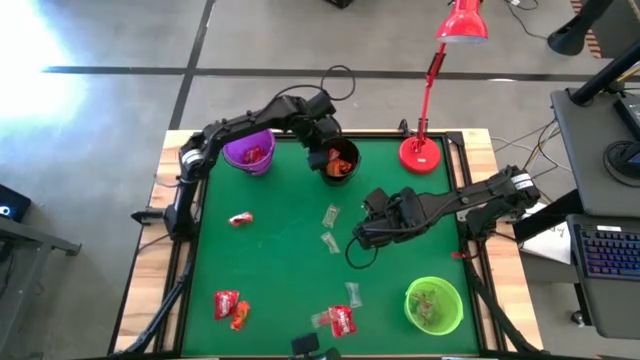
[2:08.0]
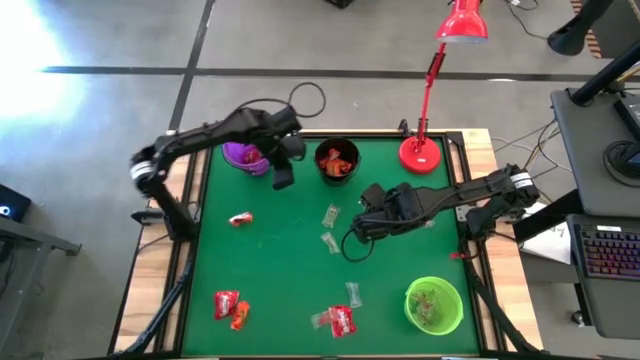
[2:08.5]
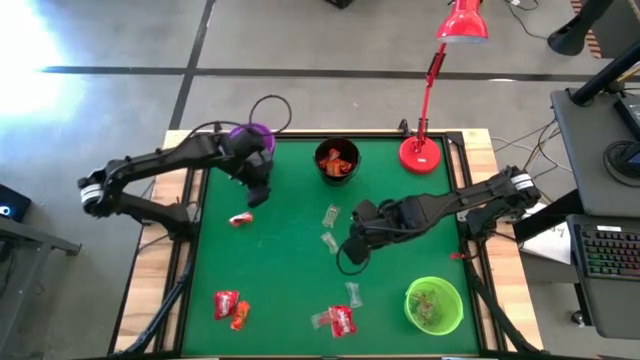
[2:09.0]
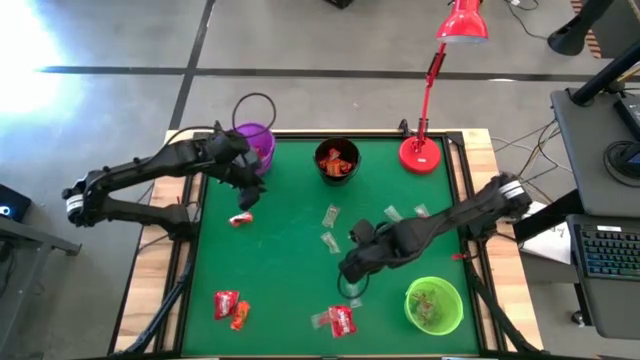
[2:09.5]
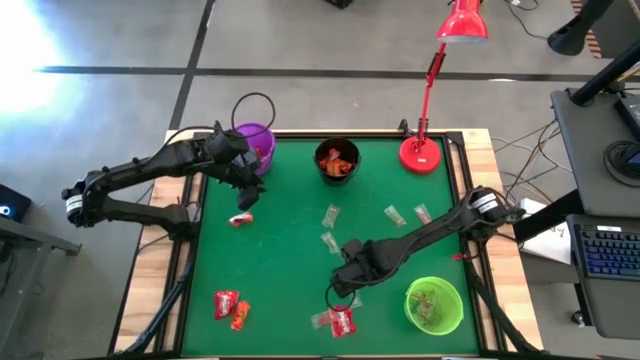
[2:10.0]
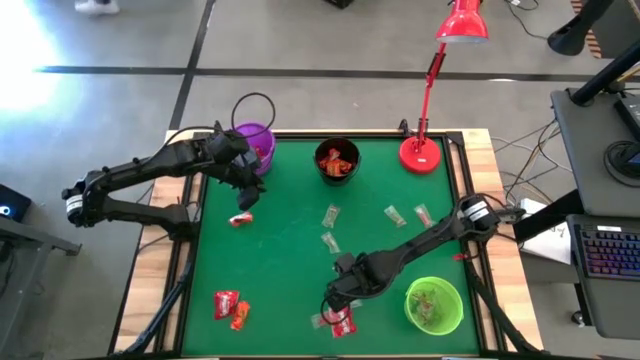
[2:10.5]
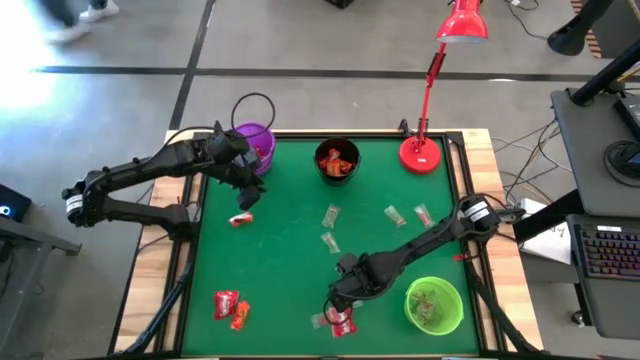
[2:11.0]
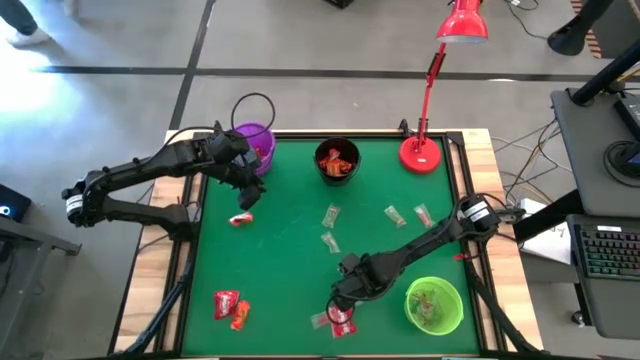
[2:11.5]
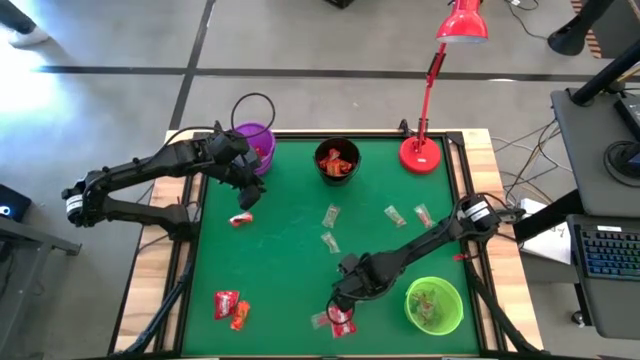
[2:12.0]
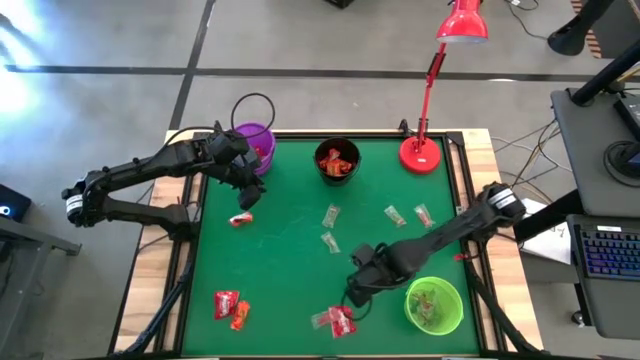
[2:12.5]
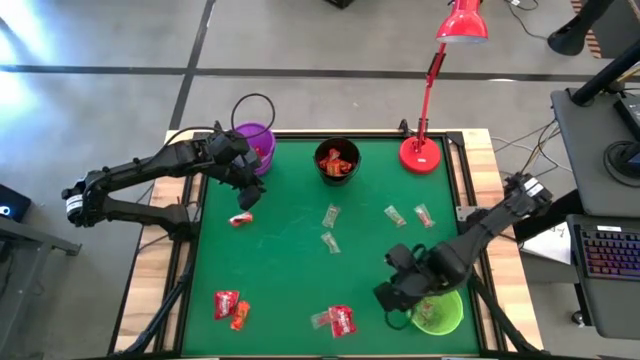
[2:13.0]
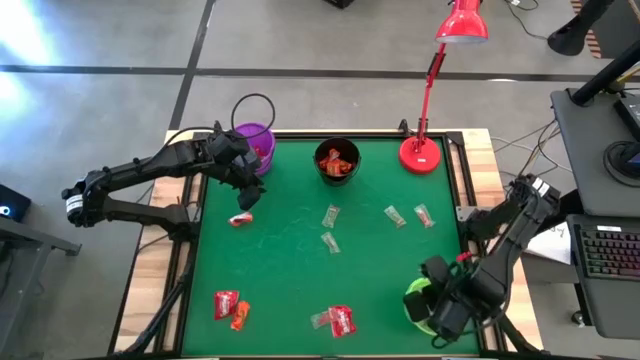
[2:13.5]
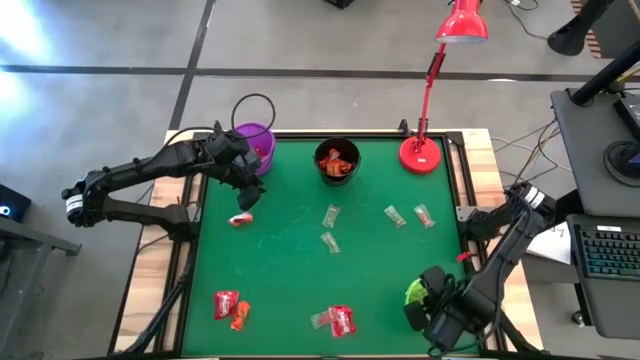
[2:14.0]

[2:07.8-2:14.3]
Task: Sort candy
Put the blue gummy into the green bucket

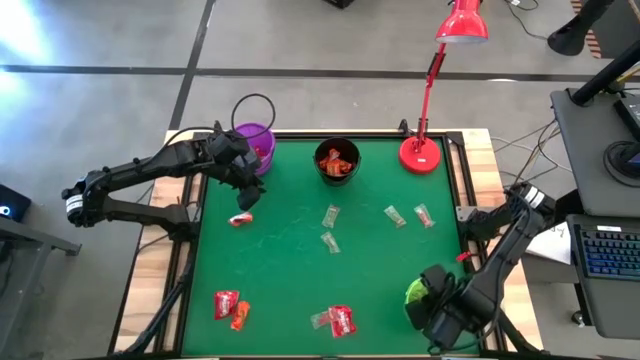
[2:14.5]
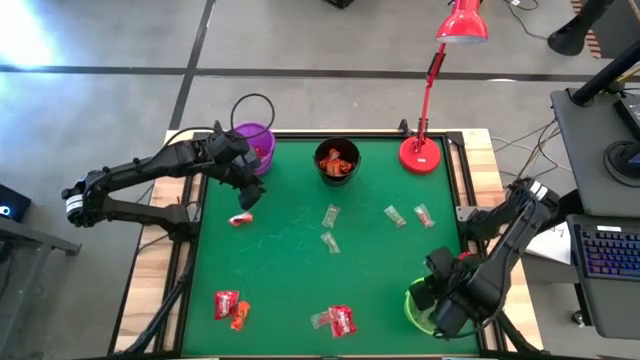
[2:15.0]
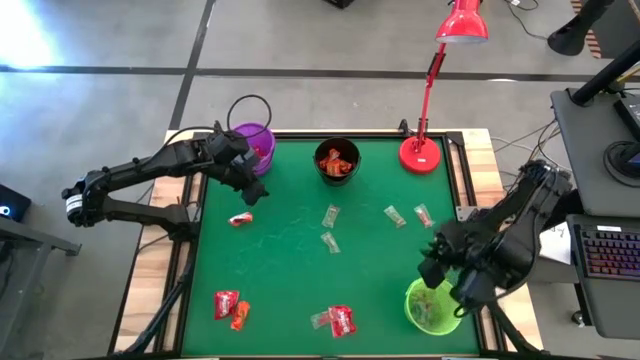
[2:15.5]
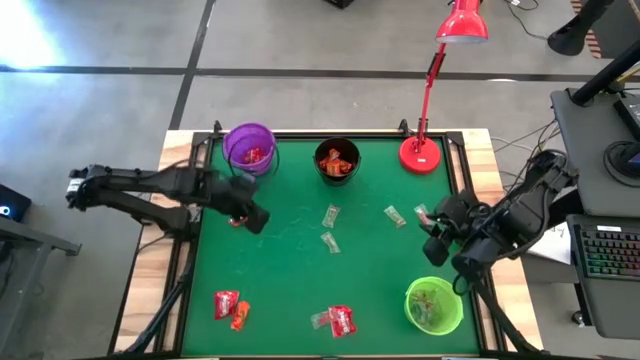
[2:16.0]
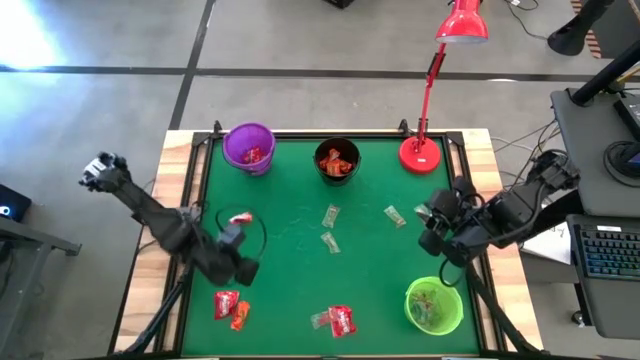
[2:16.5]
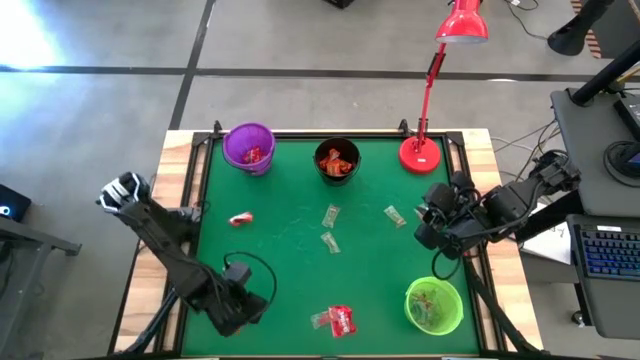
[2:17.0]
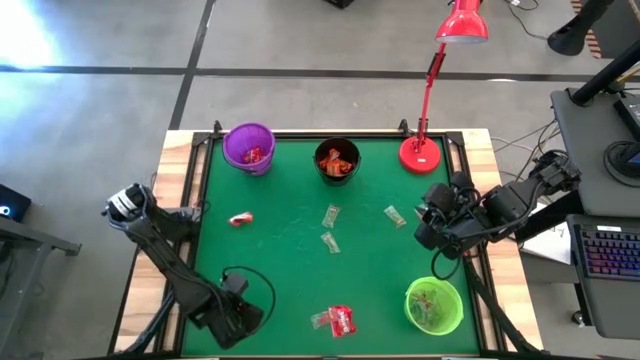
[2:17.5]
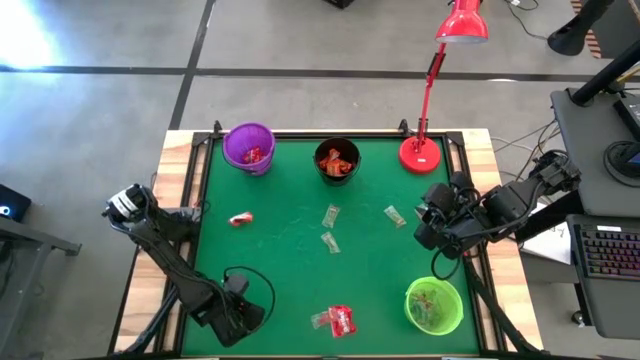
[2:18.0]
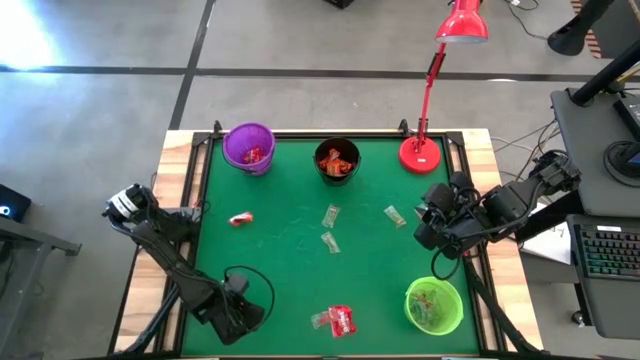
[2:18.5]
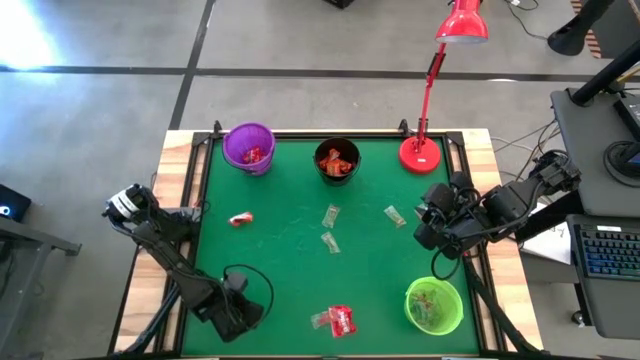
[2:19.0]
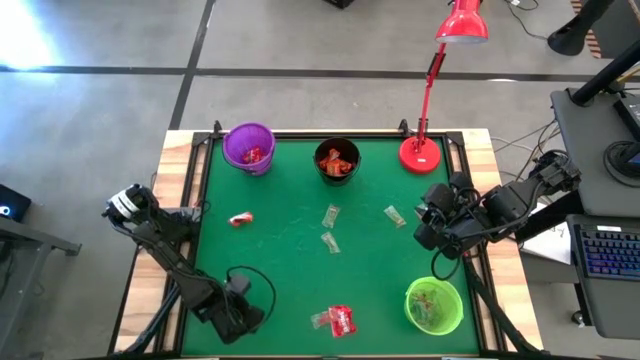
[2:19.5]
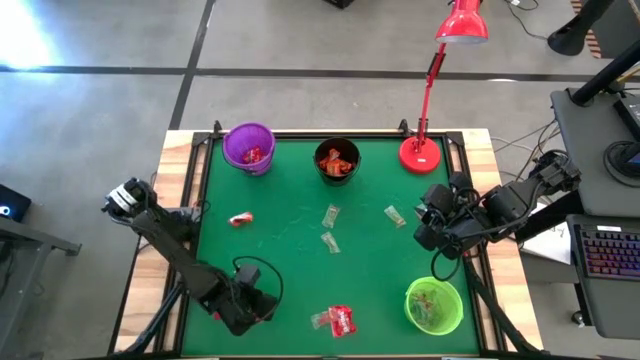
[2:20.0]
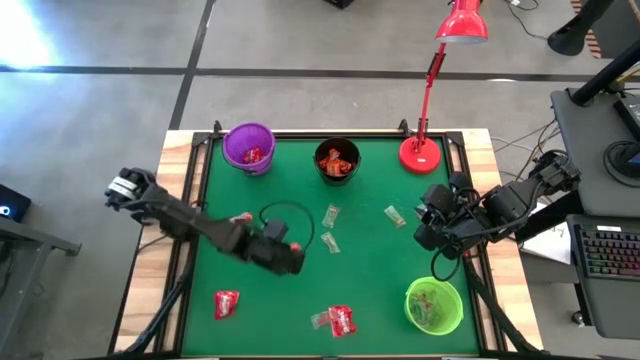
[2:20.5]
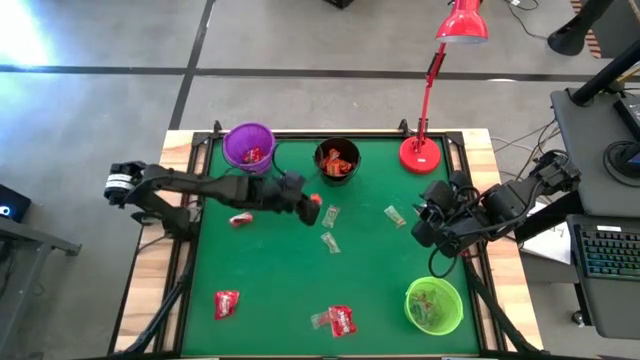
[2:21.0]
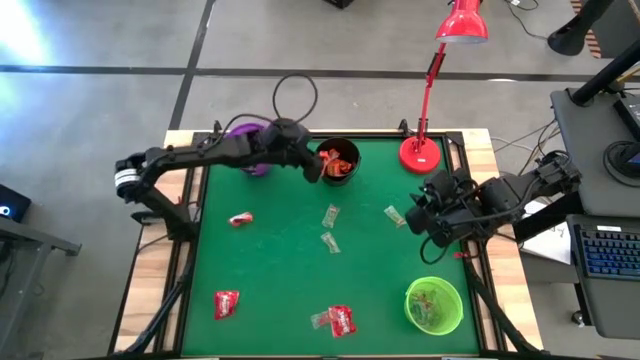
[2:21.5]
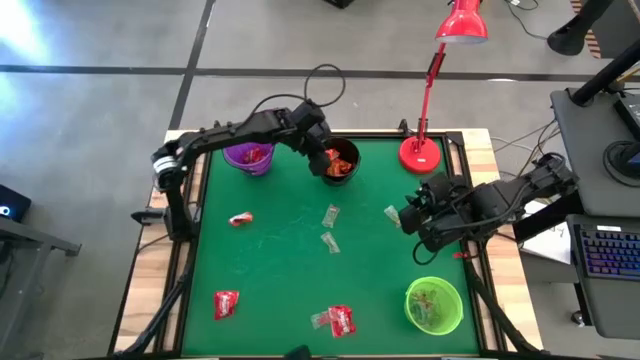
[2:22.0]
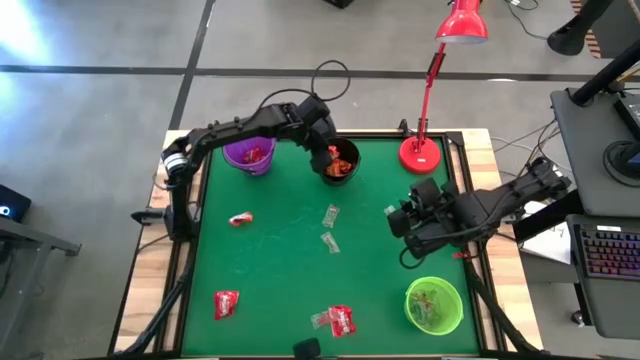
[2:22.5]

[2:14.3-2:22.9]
Put the orange candy into the black bucket

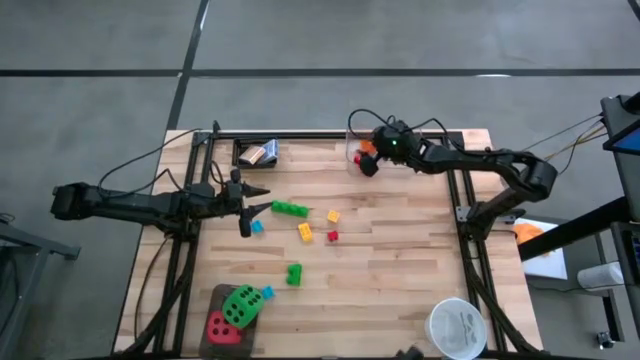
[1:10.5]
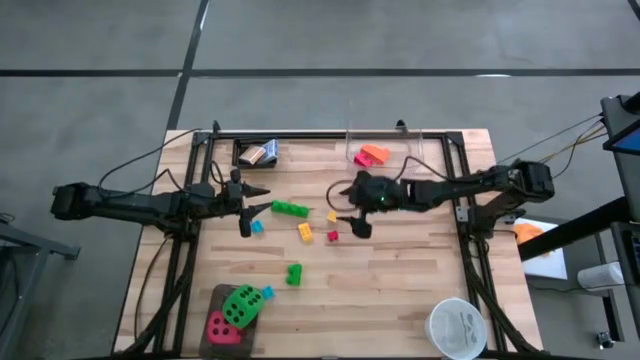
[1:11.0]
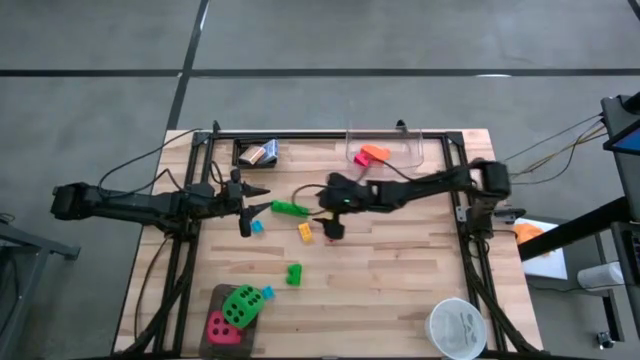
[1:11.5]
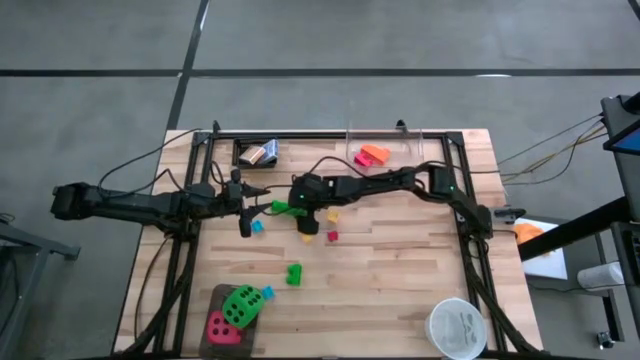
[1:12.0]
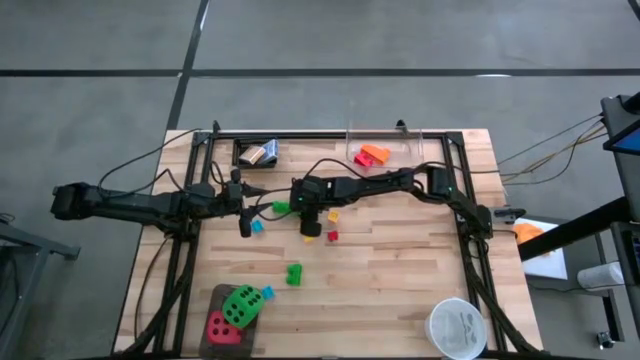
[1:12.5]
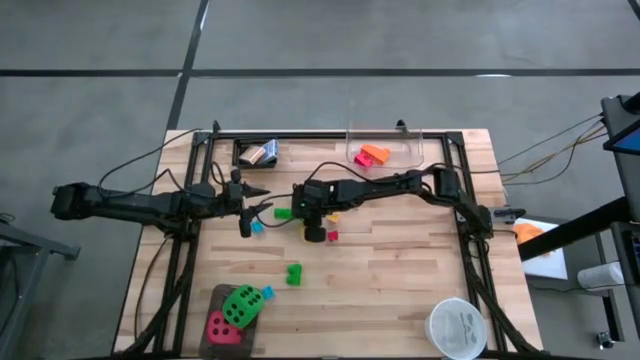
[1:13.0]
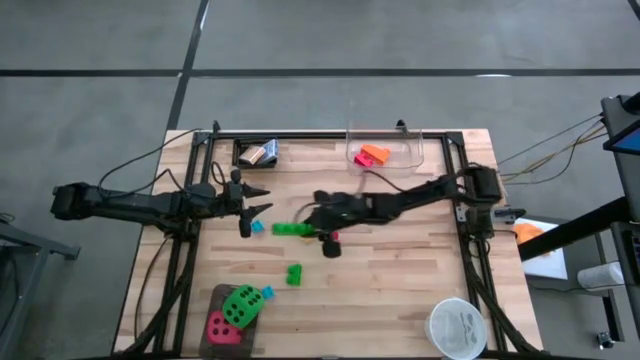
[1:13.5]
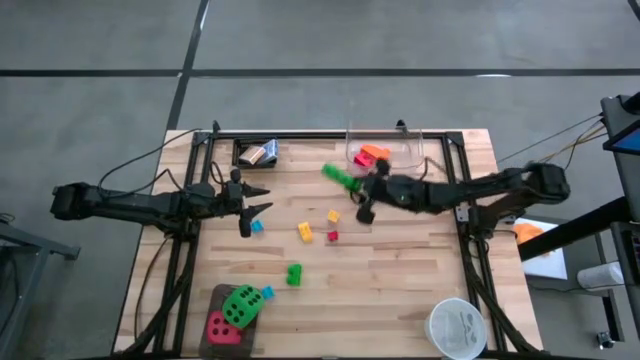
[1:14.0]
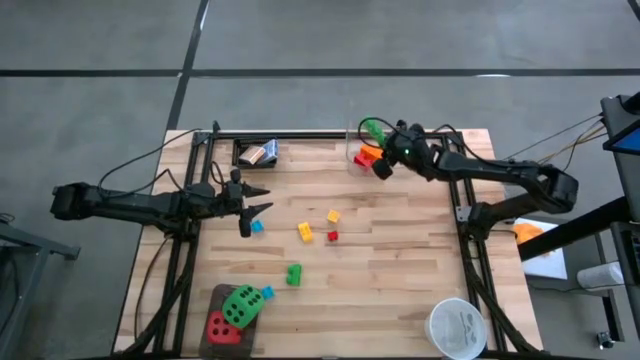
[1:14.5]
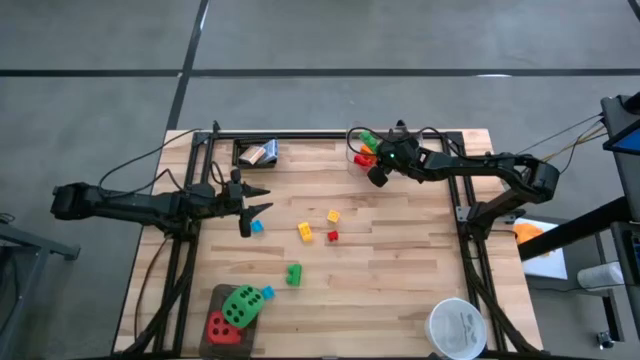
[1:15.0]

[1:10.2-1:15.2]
Task: Pick & Place Toys
Put the top green game piece into the transparent bin

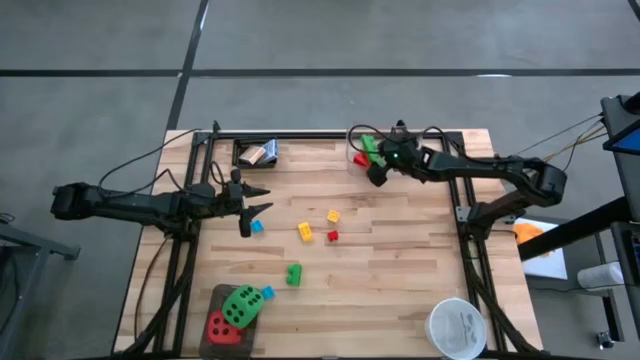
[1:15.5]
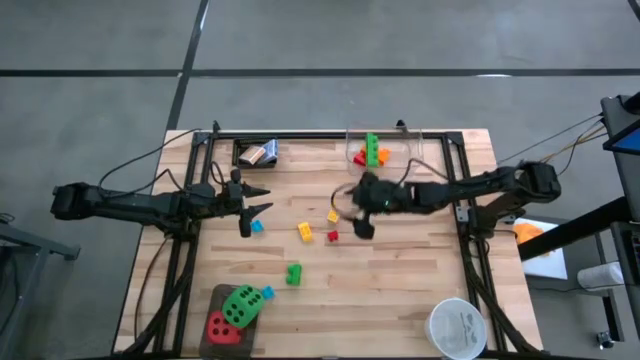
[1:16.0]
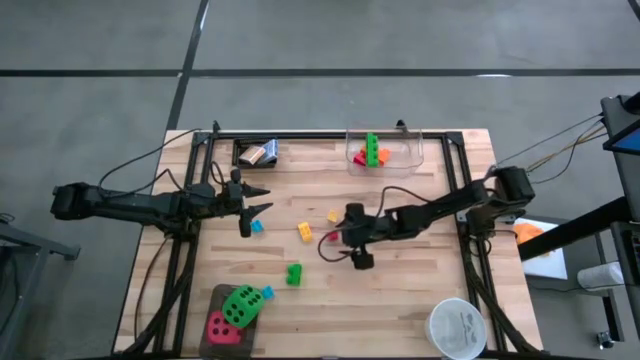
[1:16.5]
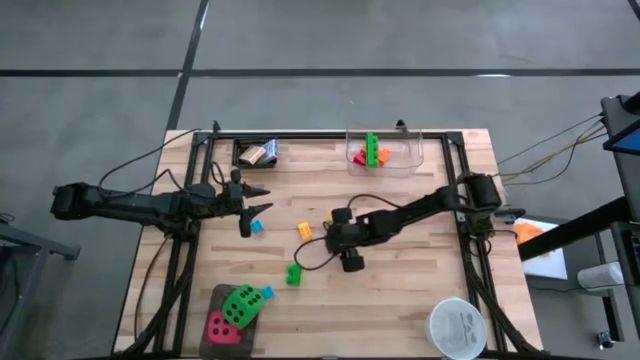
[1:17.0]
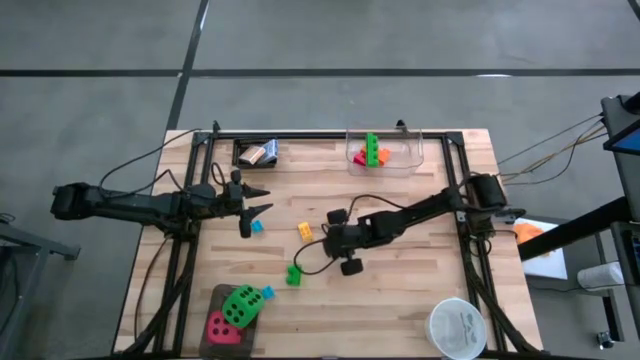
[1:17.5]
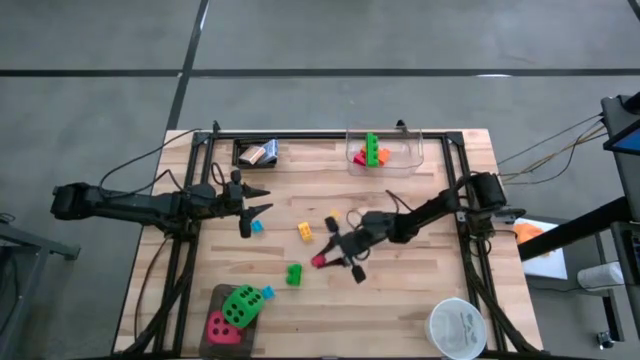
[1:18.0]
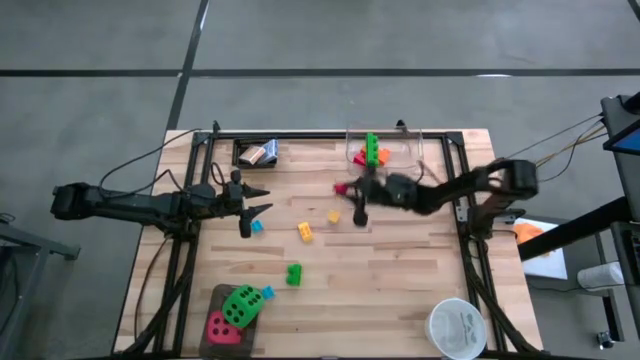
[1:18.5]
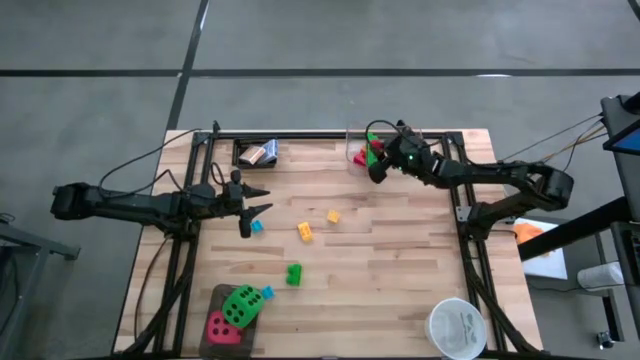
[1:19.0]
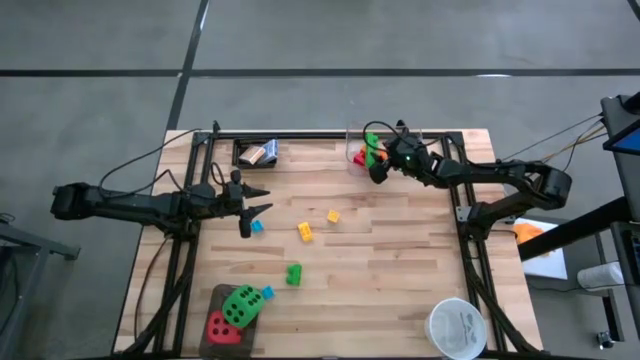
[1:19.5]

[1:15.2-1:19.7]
Put the red game piece into the transparent bin
